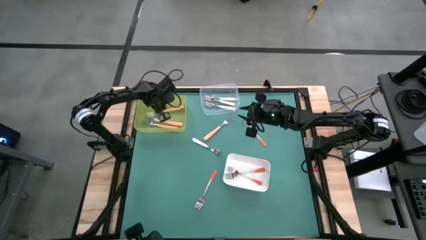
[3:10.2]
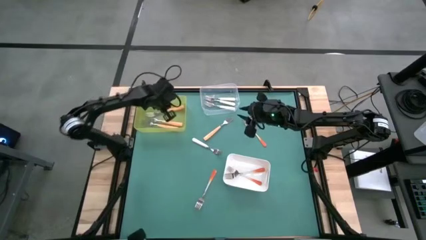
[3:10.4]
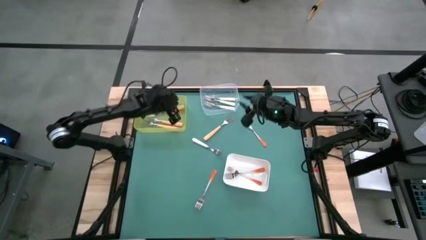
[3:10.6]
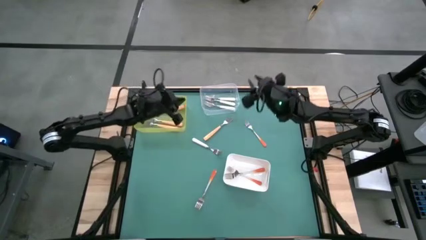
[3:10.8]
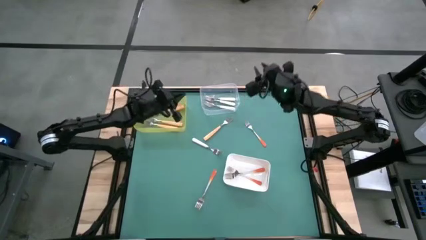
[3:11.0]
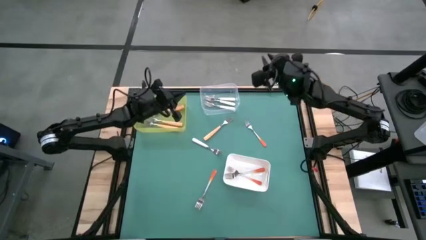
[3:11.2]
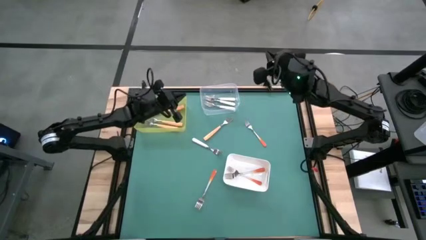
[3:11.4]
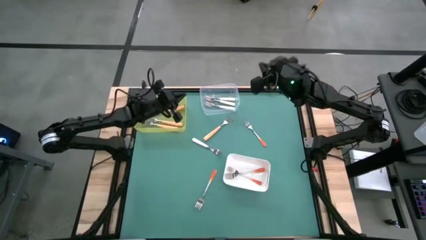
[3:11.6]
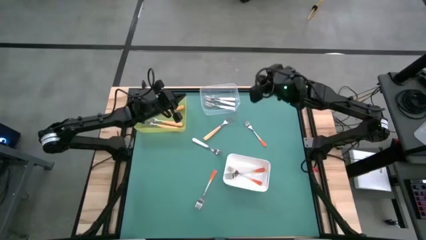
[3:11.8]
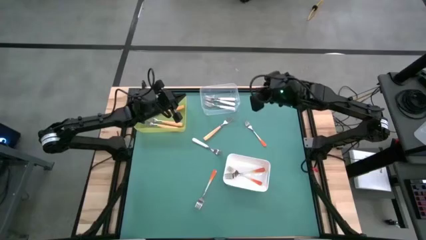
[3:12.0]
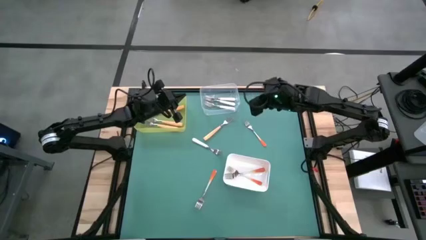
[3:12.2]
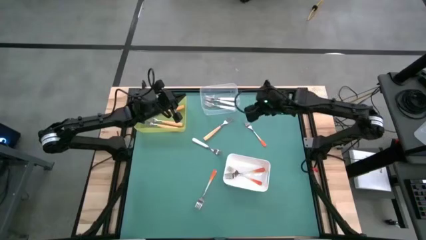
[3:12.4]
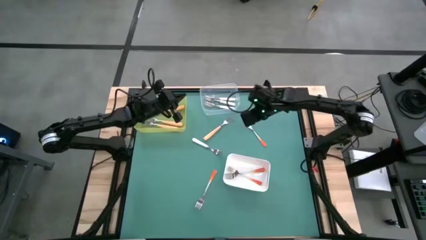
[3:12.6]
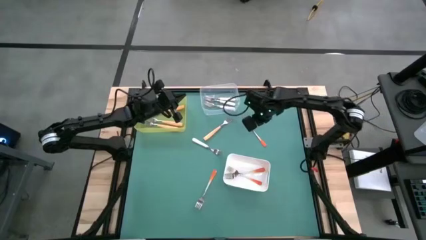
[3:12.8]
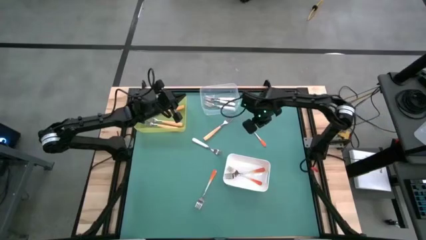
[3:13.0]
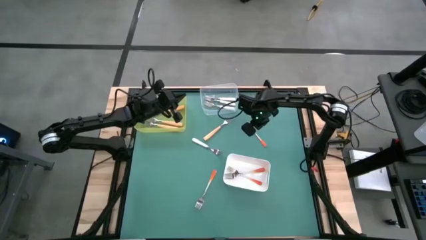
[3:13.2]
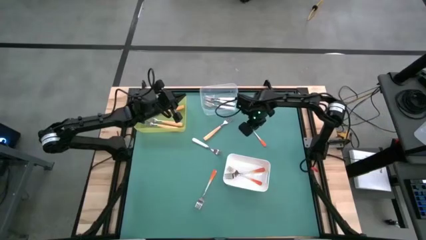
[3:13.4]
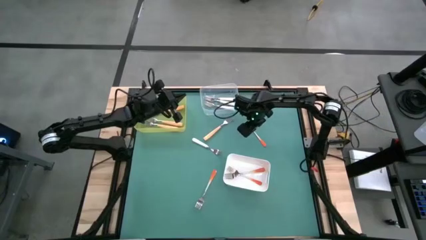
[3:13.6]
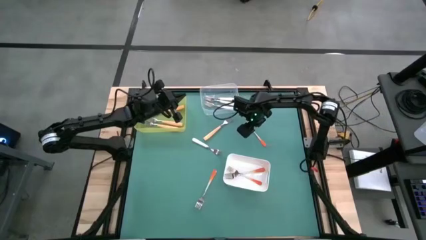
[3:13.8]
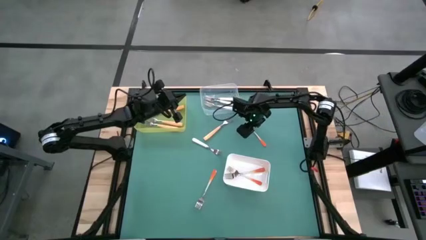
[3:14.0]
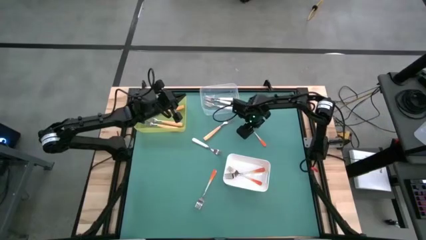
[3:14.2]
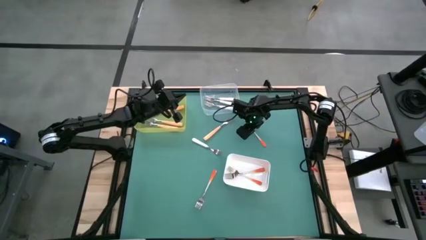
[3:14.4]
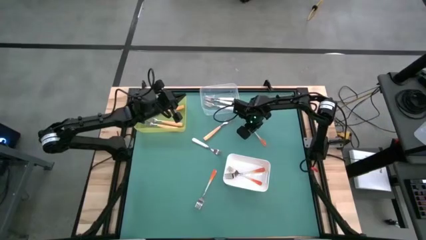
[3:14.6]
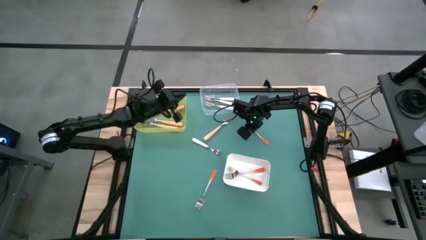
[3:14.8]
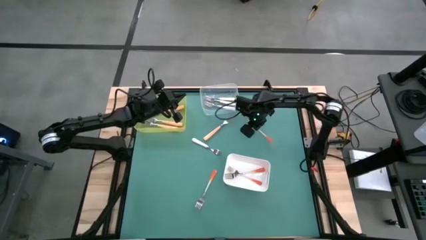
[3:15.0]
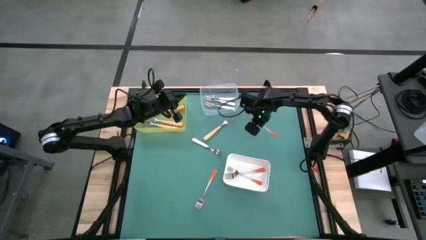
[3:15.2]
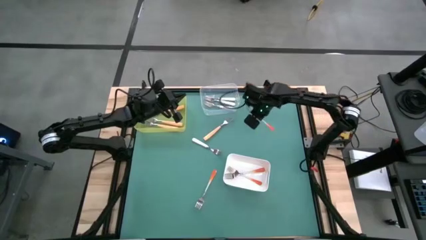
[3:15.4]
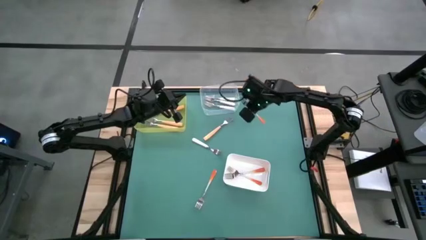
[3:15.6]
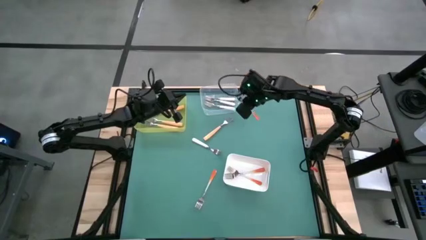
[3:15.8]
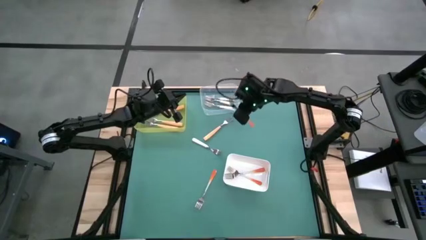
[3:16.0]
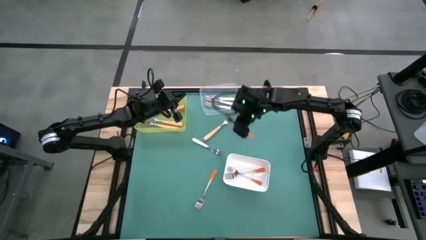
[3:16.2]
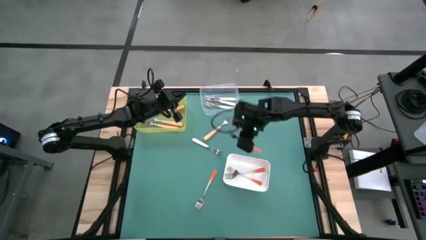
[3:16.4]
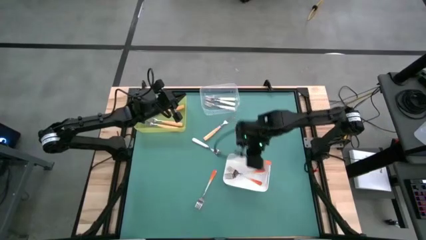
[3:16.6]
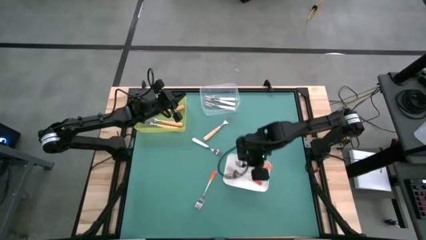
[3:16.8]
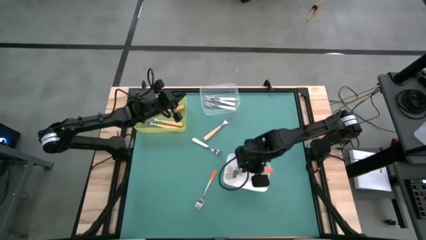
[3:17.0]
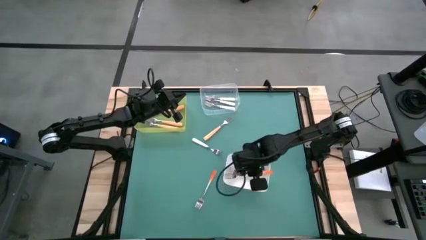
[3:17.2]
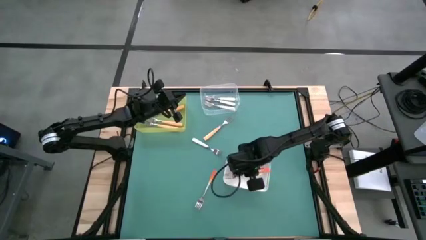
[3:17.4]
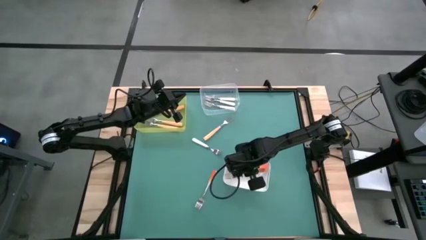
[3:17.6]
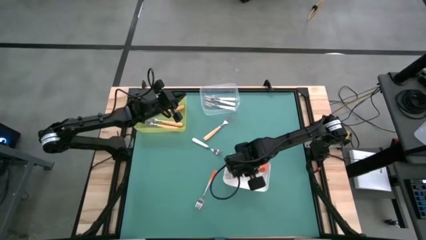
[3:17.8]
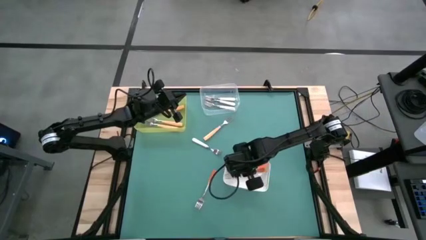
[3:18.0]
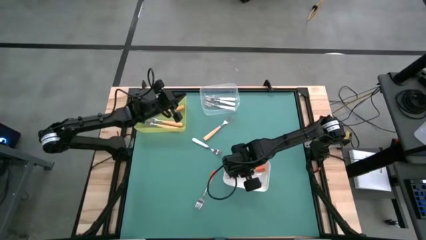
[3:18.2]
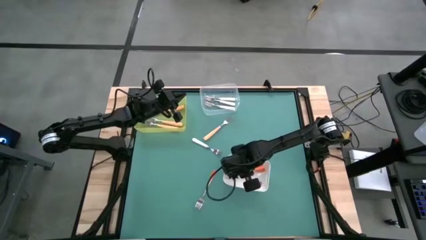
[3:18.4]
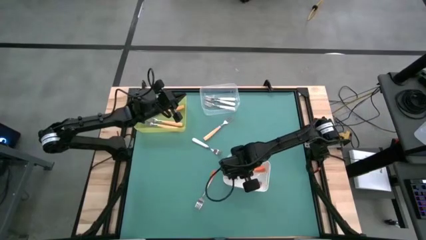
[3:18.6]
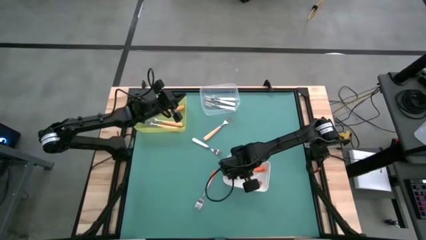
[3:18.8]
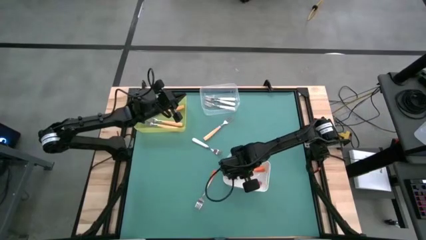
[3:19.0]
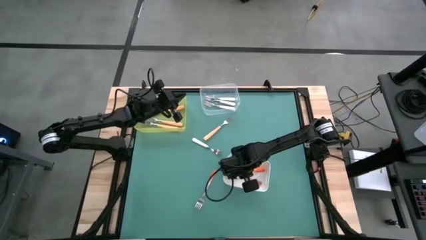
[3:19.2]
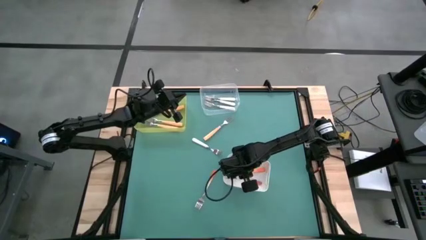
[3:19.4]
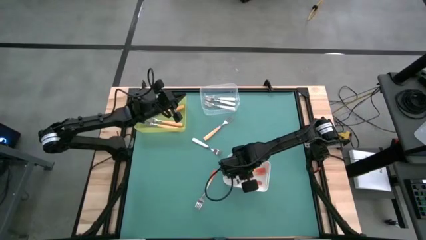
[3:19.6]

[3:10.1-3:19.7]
Task: Sort silverware by color (type)
Put the orange fork into the white bin

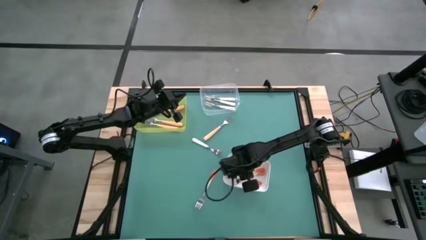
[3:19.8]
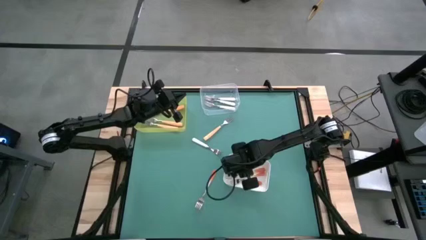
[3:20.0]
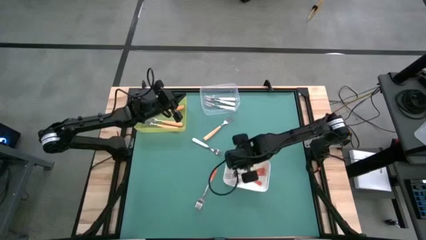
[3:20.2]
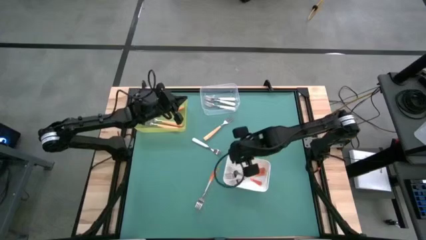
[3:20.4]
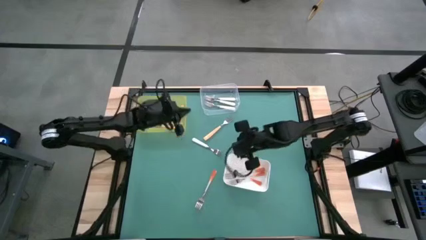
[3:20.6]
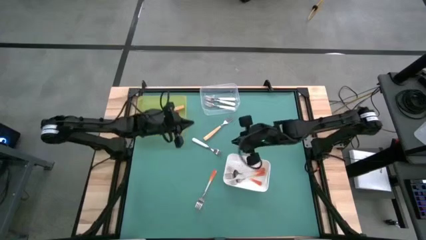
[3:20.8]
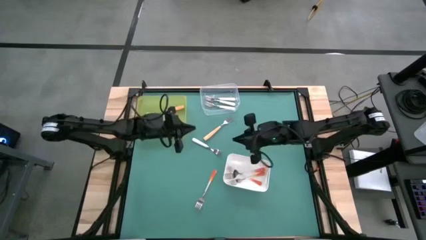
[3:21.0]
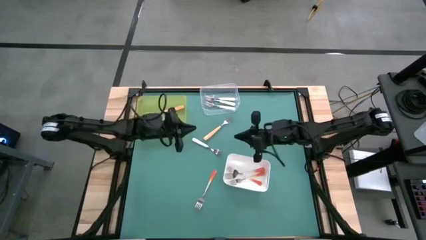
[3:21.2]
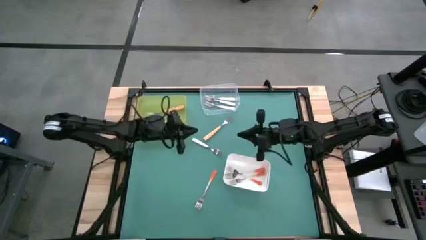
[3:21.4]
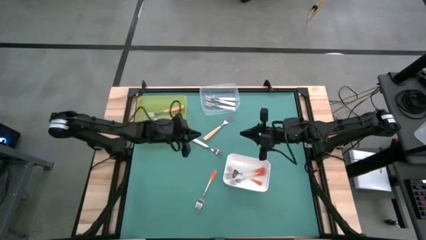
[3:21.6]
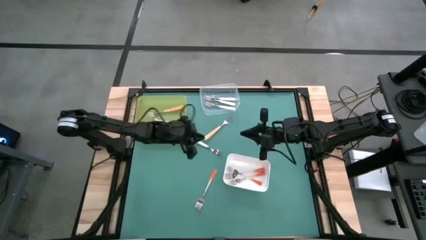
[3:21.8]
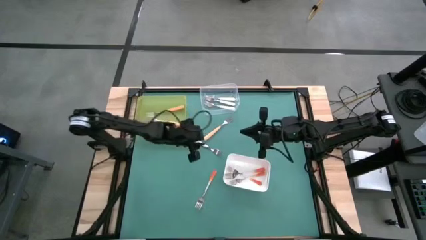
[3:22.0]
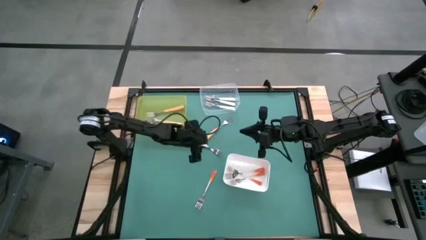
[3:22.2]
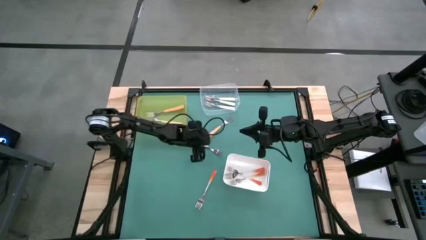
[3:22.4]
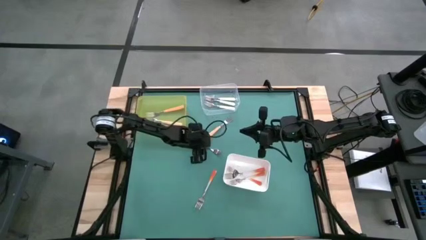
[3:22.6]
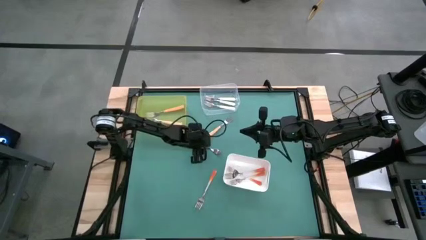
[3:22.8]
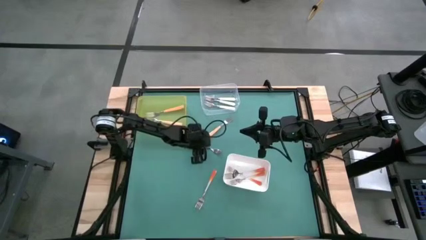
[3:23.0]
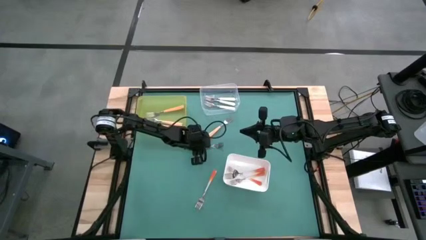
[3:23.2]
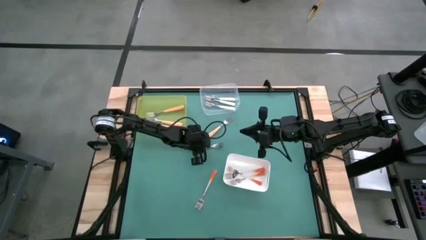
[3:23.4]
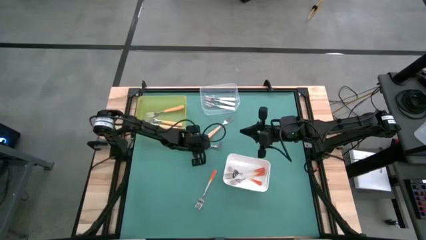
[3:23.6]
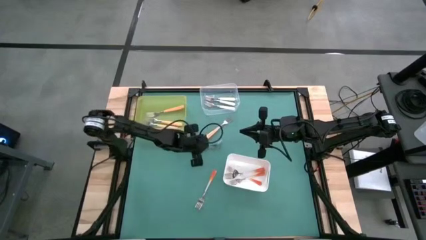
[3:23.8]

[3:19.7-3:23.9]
Put the white fork into the transparent bin

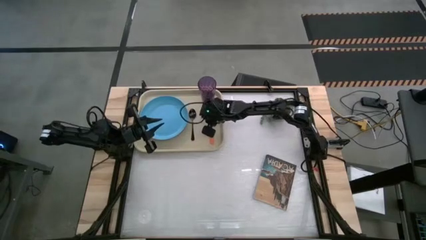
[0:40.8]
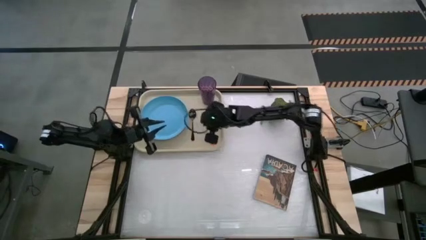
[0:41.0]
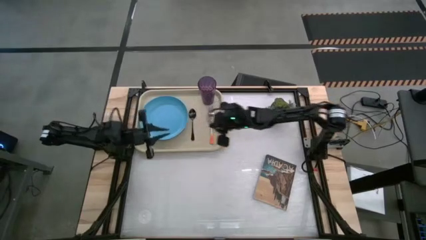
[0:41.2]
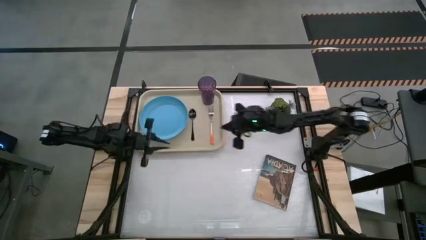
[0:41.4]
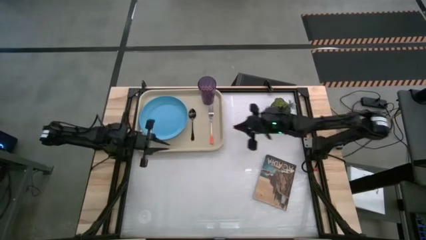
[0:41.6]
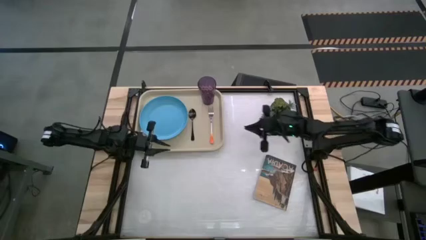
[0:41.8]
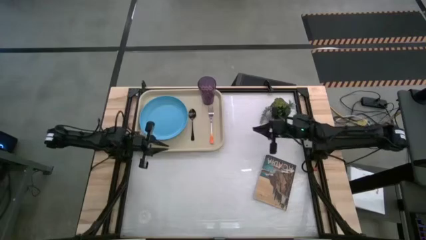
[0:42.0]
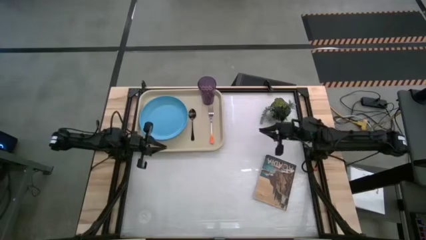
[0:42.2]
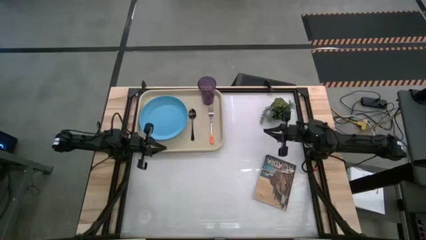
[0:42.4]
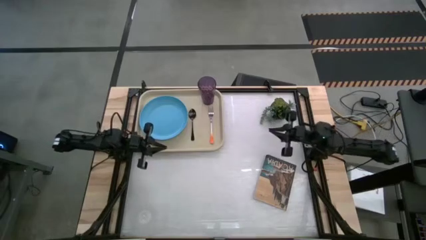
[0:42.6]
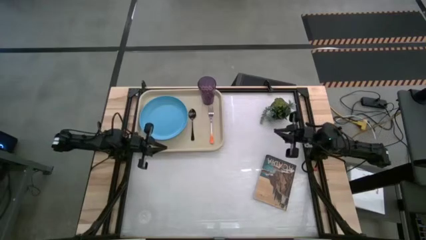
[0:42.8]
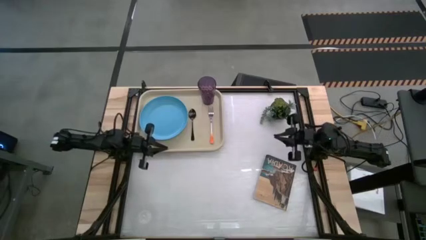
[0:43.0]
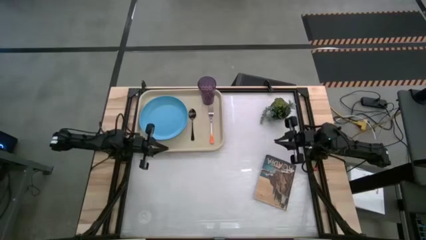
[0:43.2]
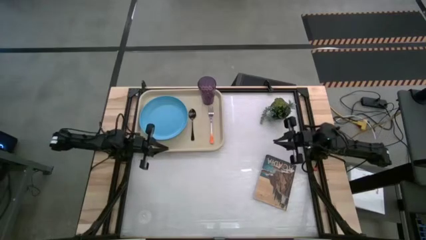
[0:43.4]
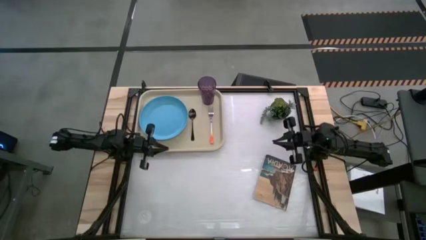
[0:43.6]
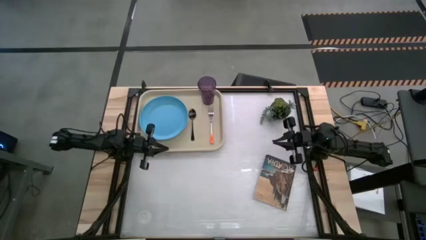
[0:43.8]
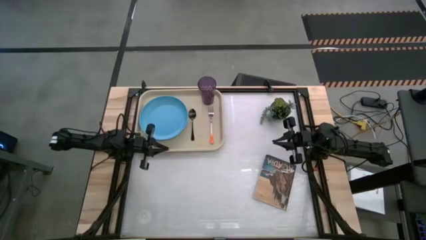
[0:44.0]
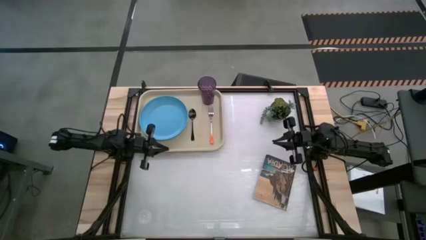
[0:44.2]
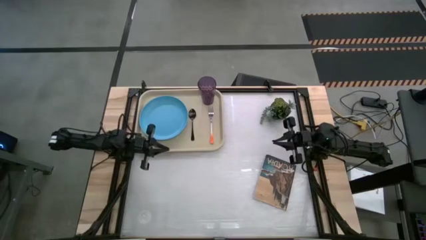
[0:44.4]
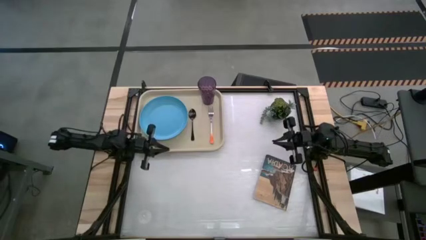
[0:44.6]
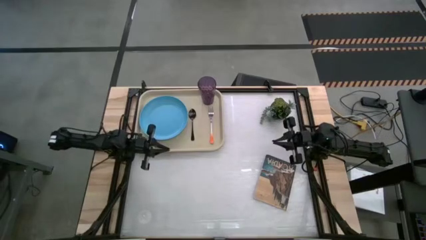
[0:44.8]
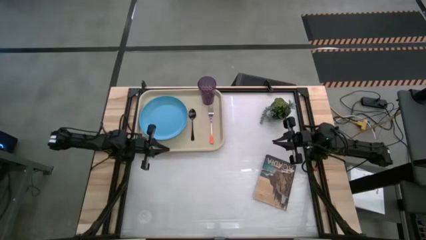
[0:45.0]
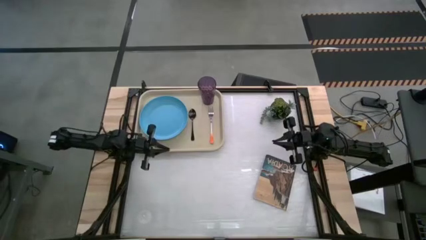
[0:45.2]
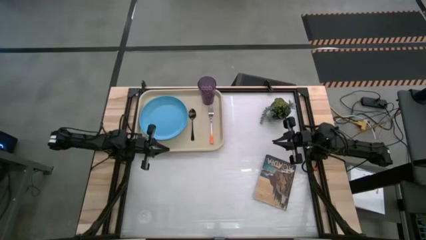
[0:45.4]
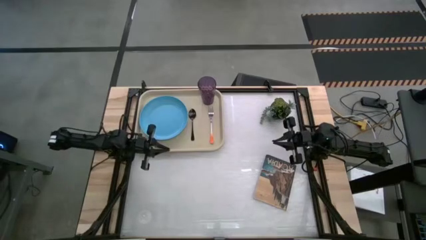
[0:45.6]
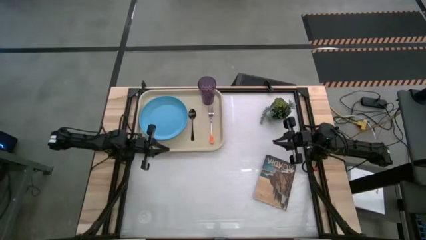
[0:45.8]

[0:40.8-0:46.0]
Task: Pick and place plate/cup/fork/spoon on tray
Return to Home Position
